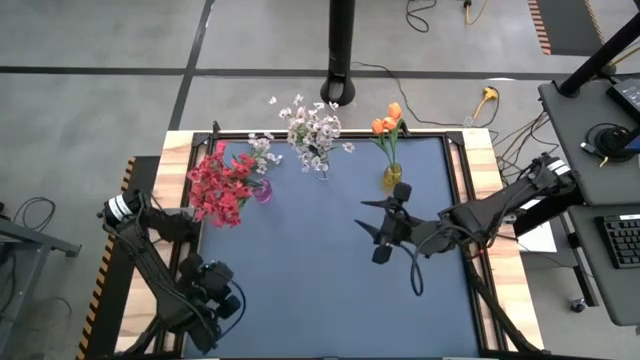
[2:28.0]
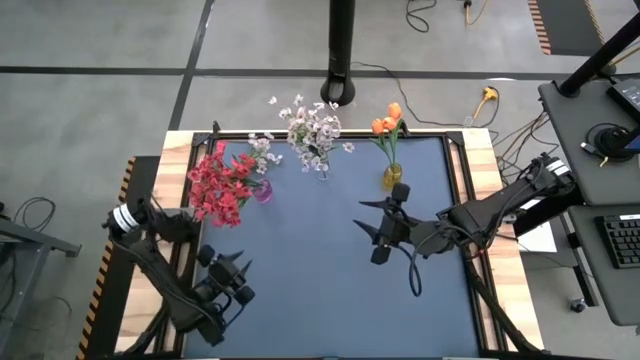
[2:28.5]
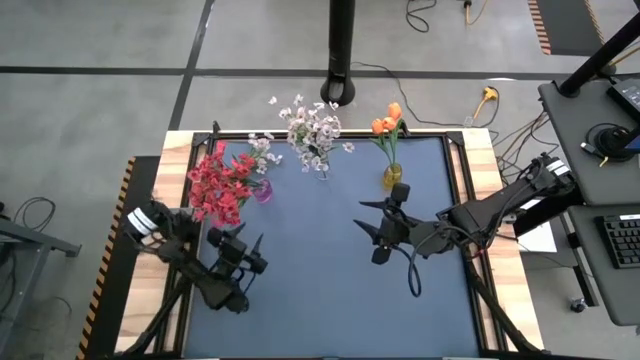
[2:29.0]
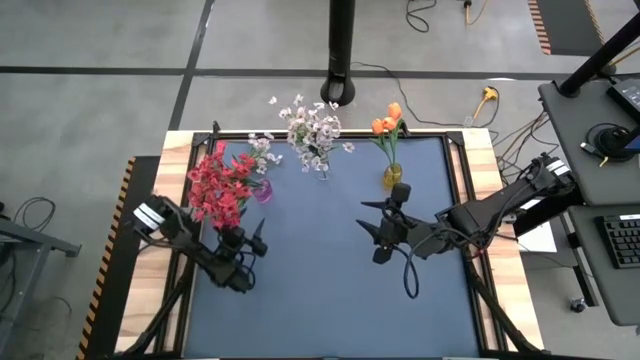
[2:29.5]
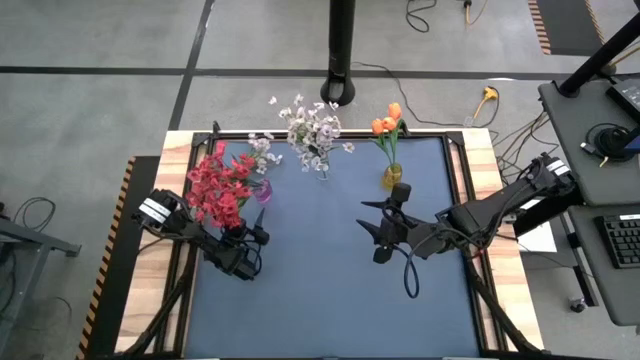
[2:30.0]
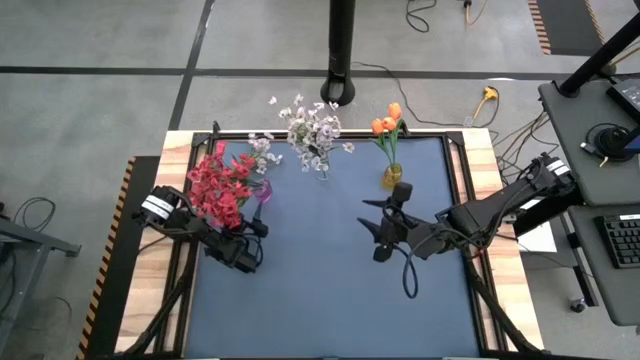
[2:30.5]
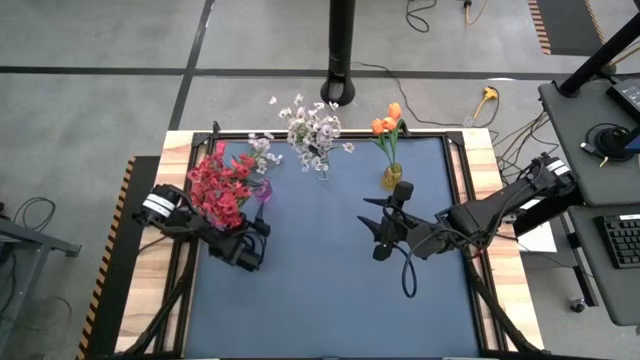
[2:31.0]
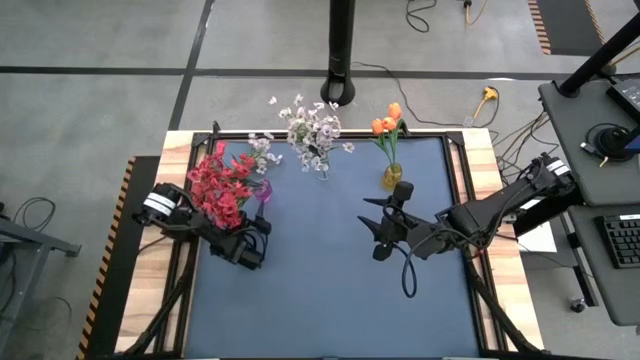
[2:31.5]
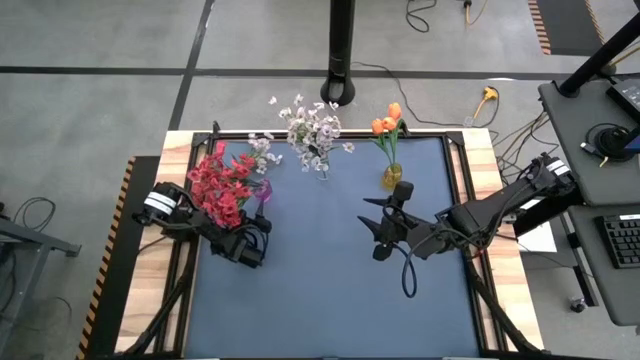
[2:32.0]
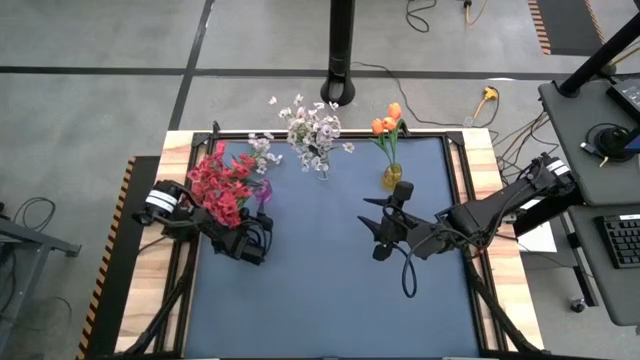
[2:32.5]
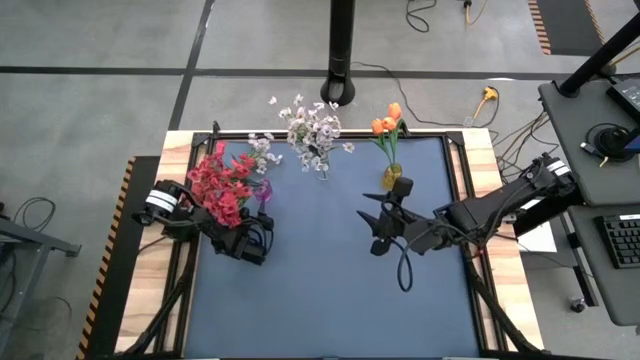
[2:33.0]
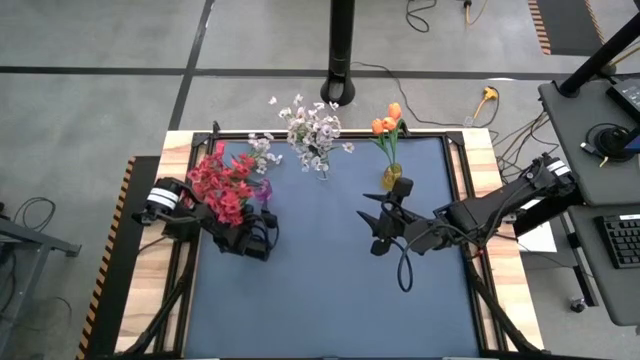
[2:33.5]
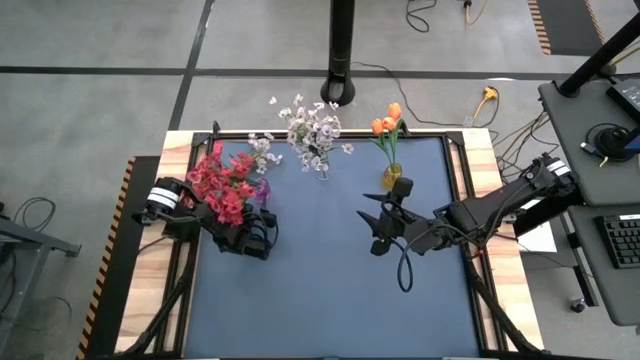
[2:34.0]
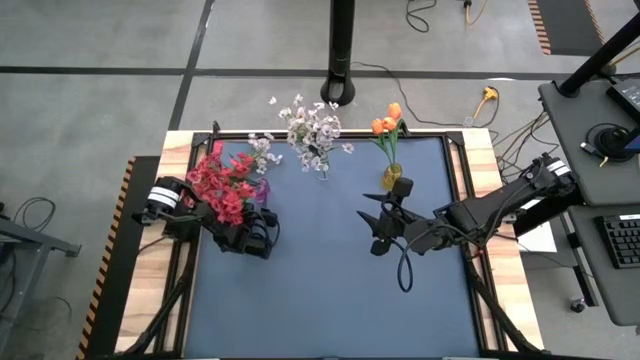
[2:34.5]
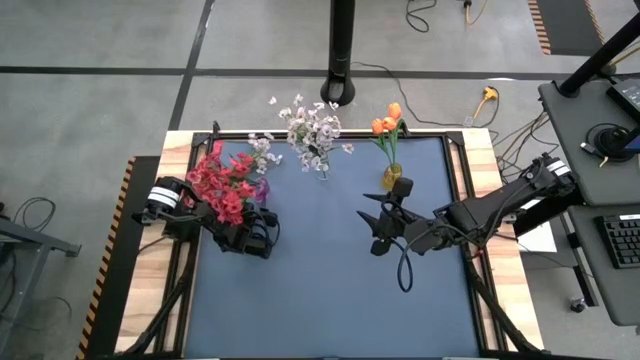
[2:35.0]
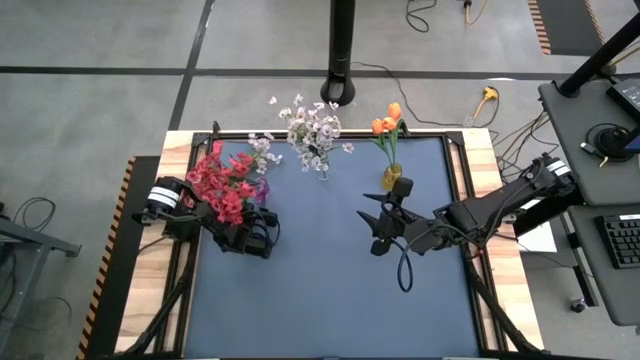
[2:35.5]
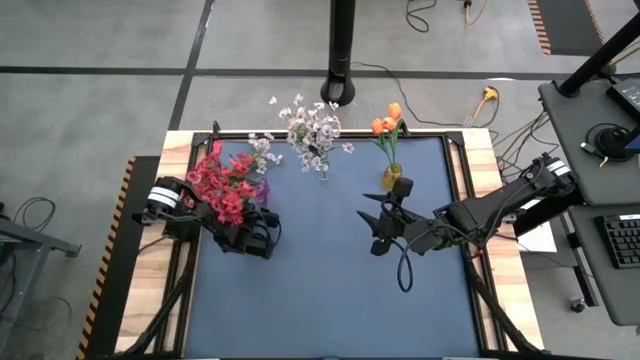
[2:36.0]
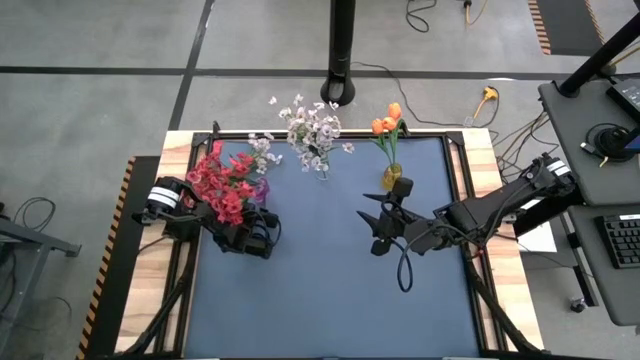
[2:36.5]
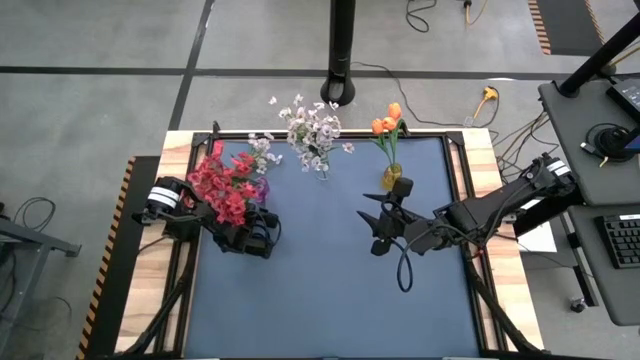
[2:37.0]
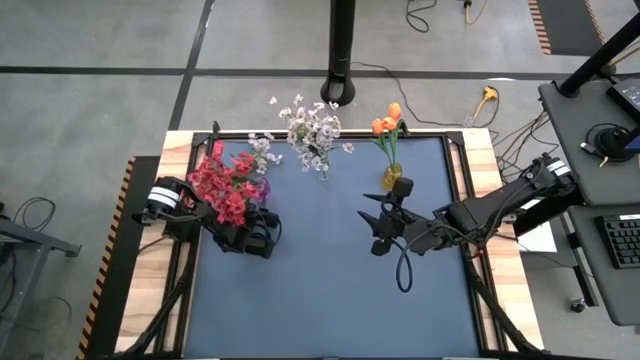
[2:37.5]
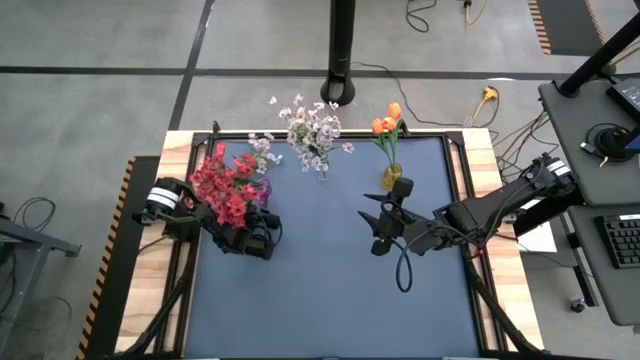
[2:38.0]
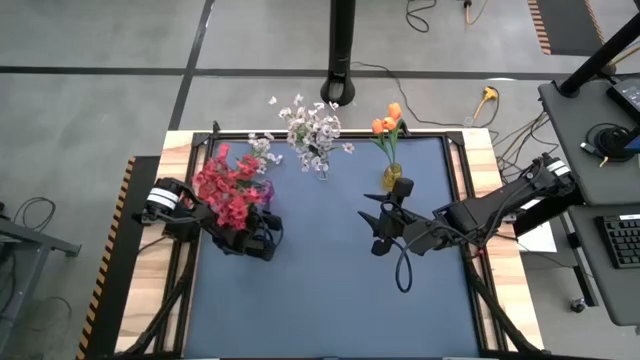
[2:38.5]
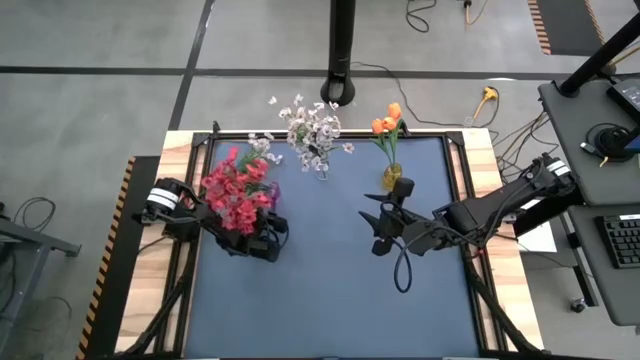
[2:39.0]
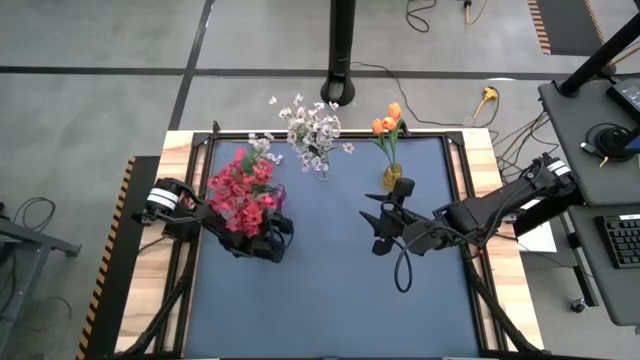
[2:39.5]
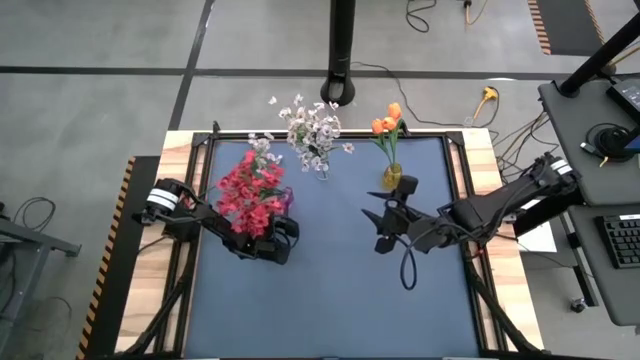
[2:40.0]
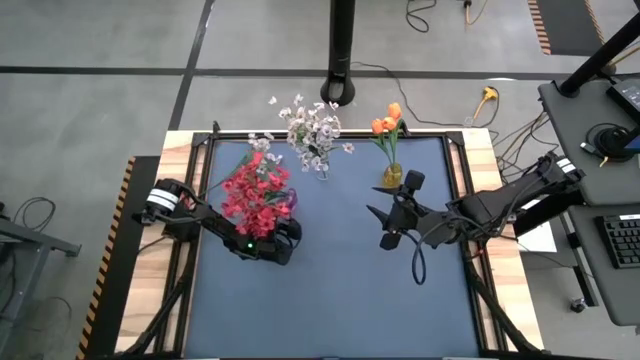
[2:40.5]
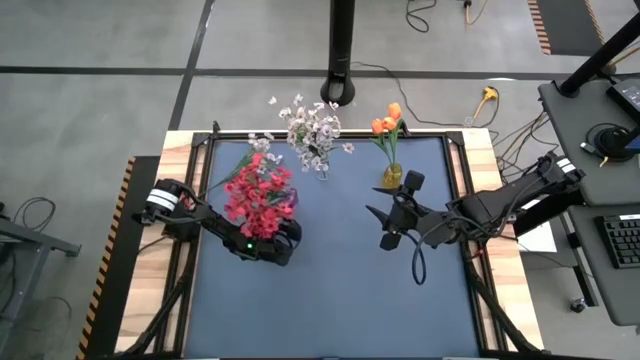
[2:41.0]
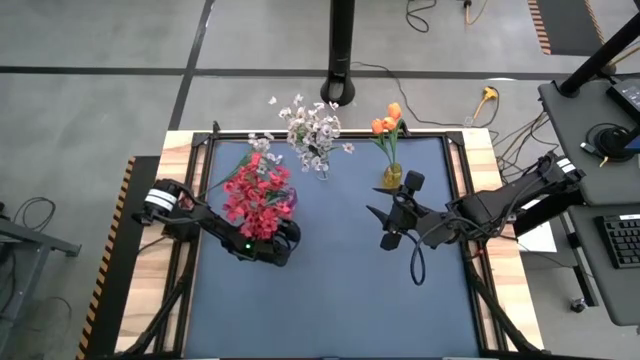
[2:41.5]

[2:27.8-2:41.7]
Task: Sort flowers into vase by color
Adjust the purple vase

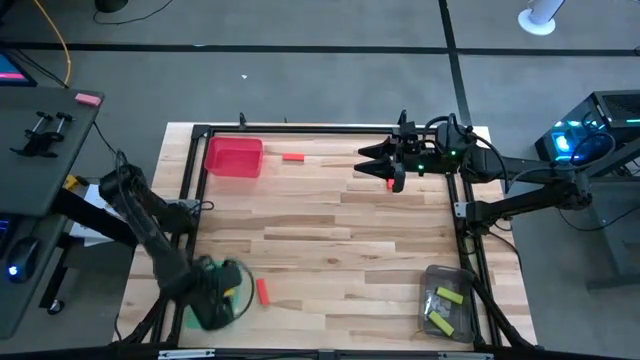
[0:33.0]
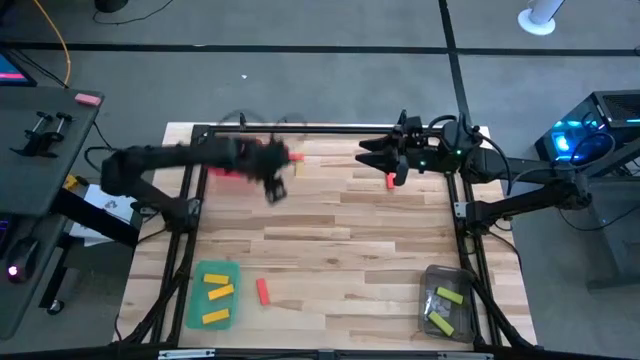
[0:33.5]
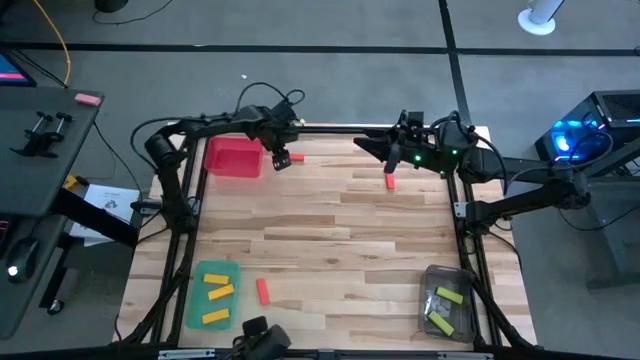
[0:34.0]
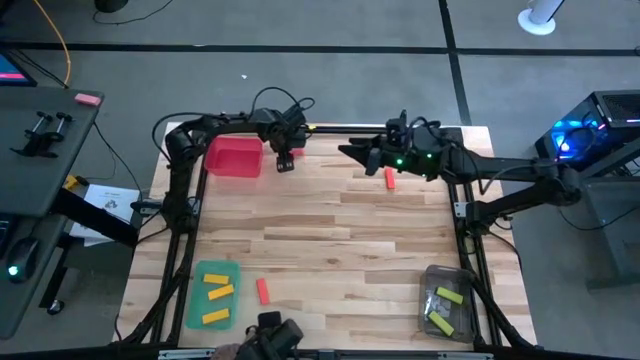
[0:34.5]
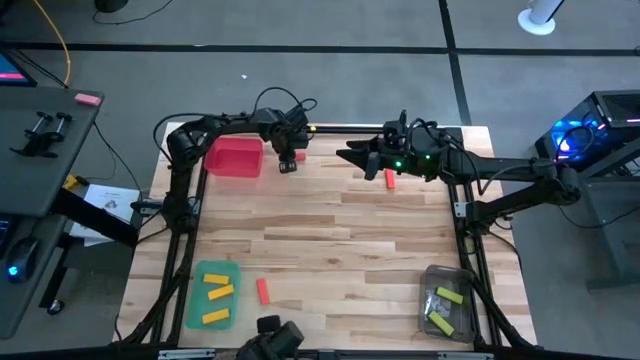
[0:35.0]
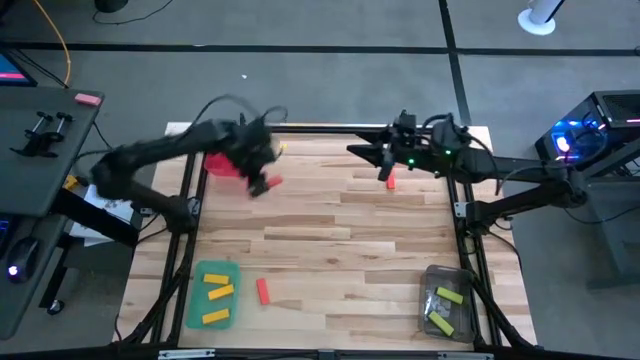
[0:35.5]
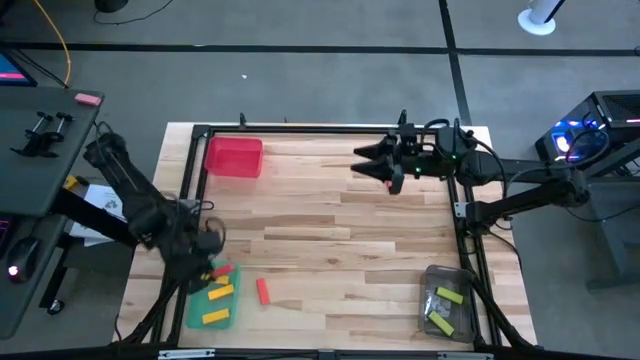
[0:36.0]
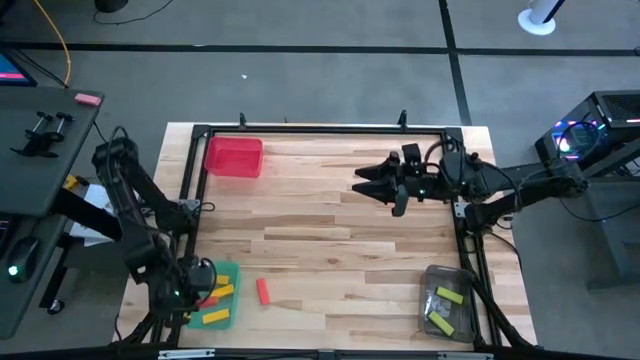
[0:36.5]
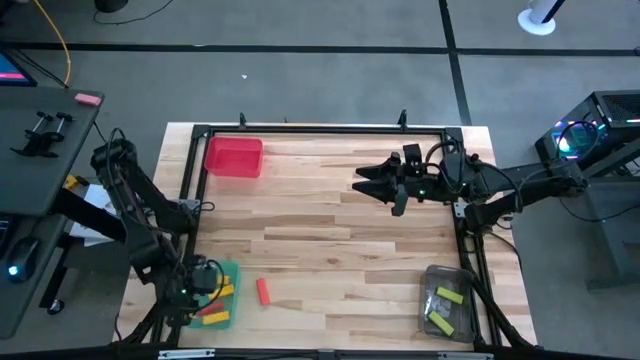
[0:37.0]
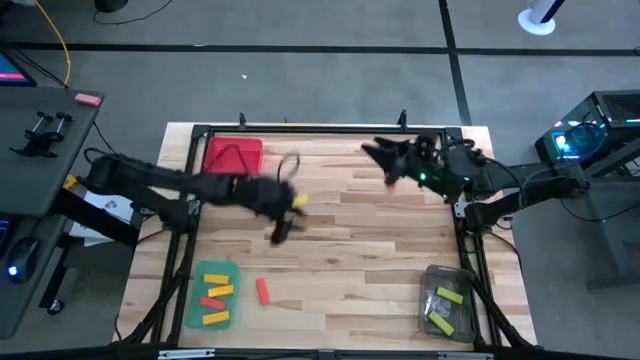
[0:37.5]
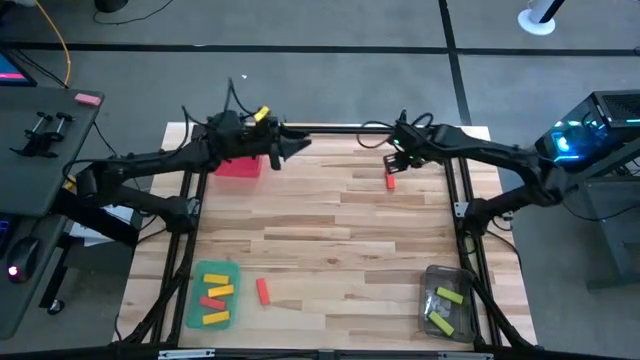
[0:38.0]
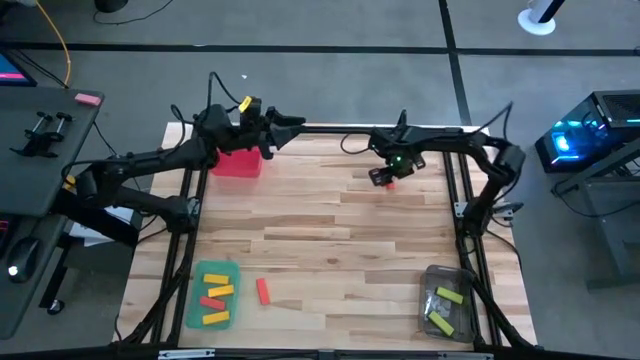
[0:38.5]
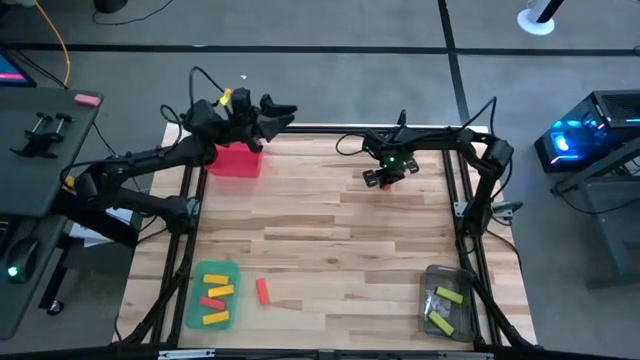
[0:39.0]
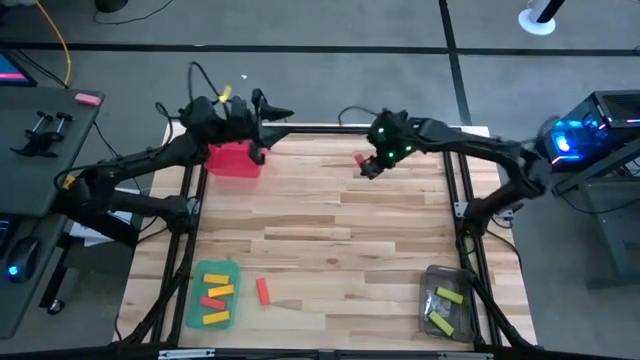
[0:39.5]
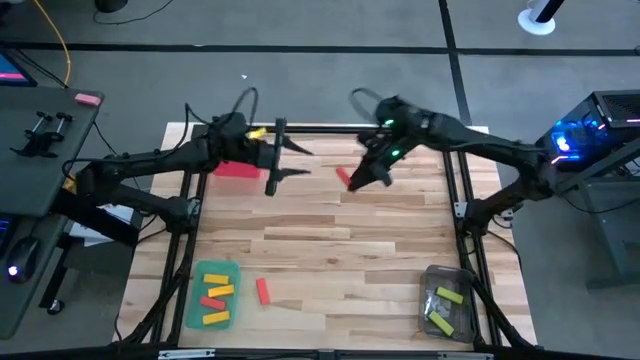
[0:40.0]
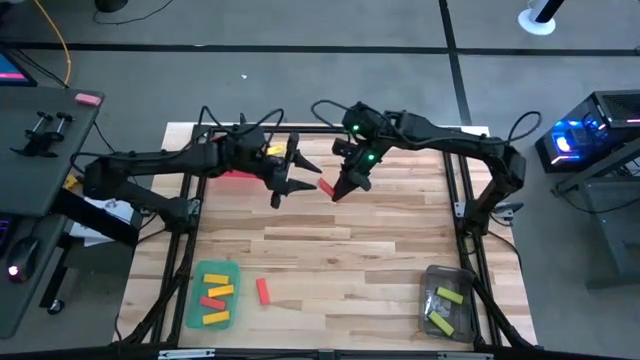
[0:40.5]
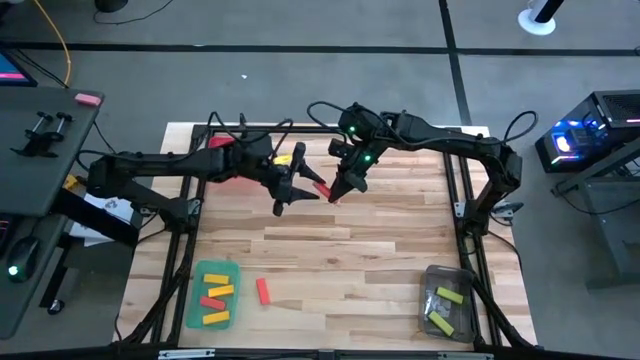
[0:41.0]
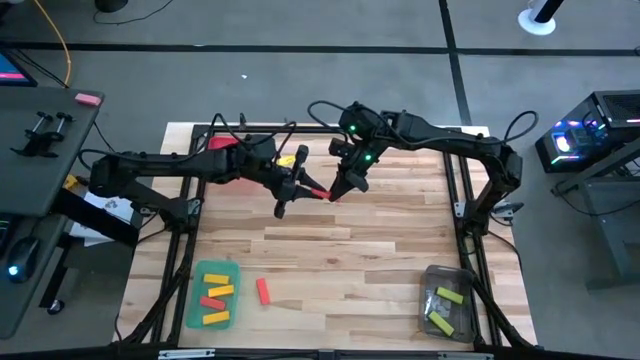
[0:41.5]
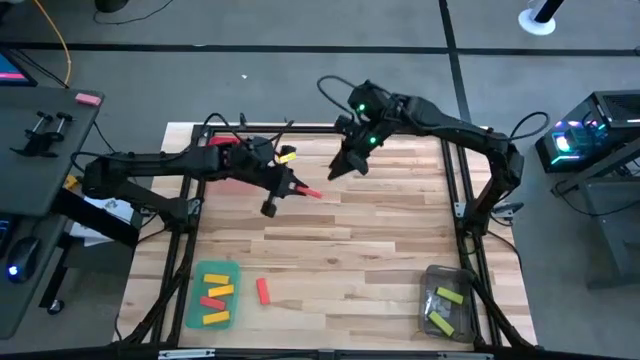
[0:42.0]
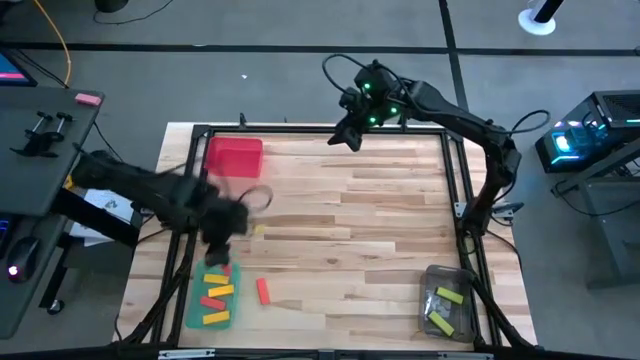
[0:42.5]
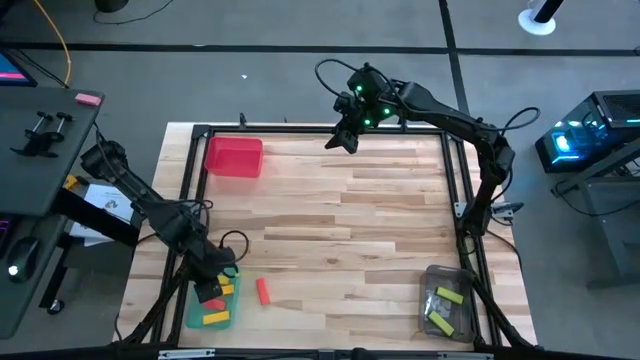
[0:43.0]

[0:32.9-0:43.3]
Task: Sort blocks
Put the red blocks into the red bin
